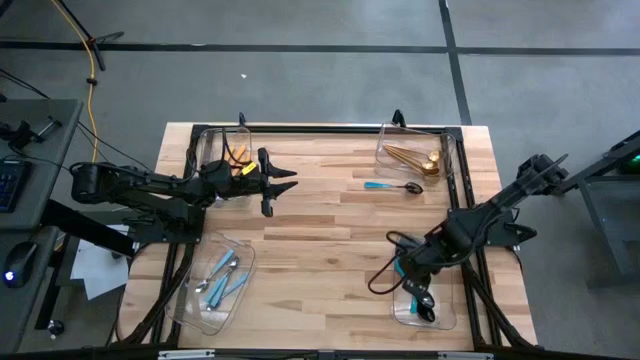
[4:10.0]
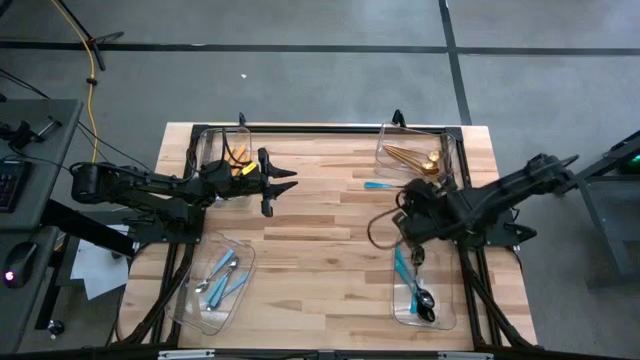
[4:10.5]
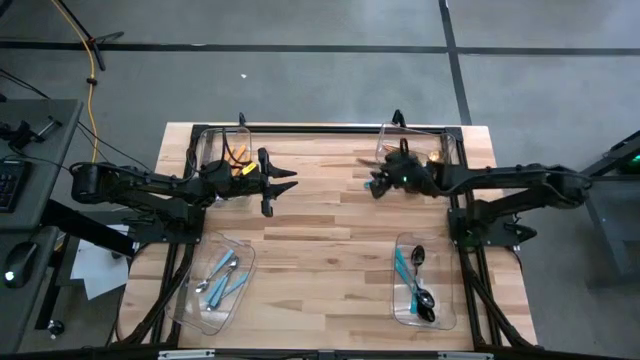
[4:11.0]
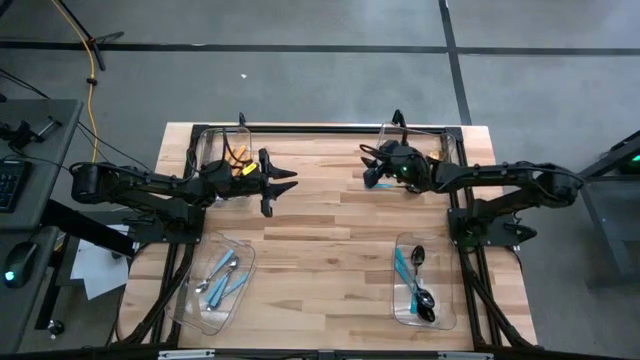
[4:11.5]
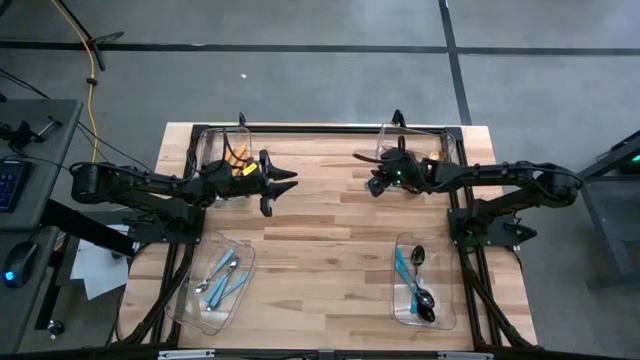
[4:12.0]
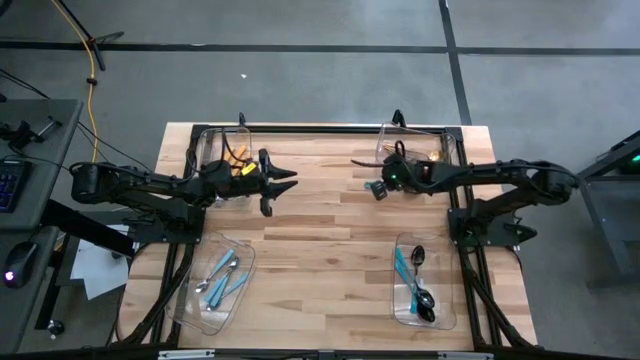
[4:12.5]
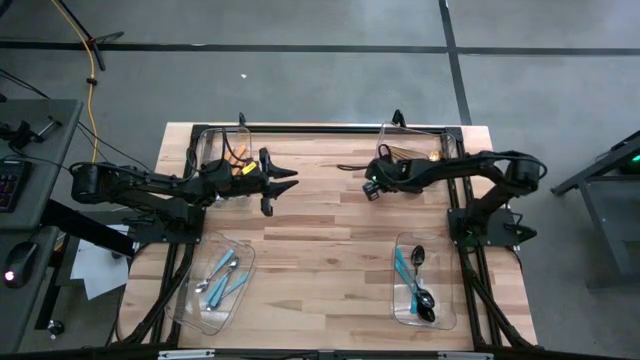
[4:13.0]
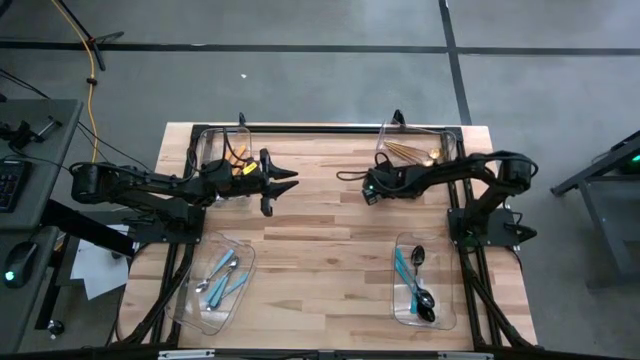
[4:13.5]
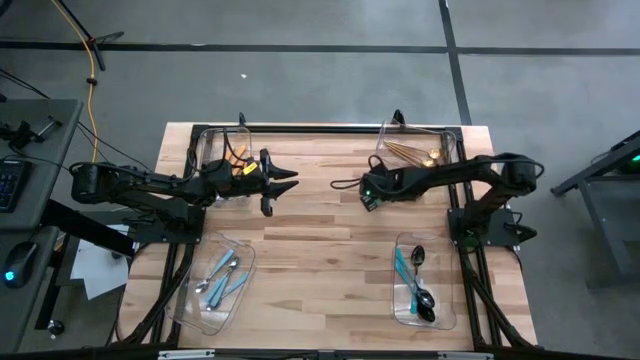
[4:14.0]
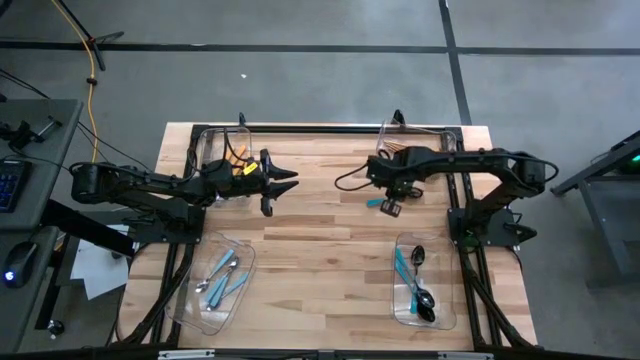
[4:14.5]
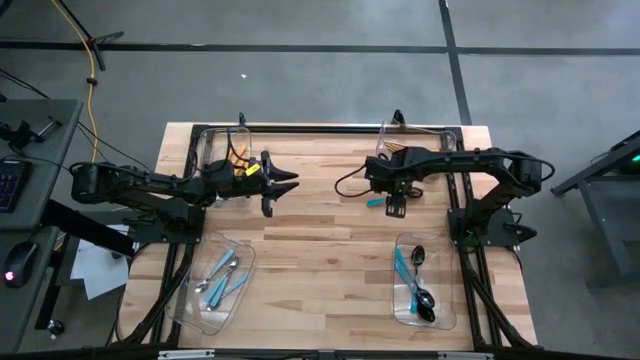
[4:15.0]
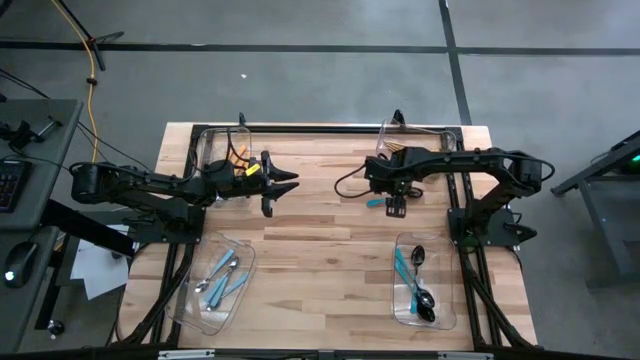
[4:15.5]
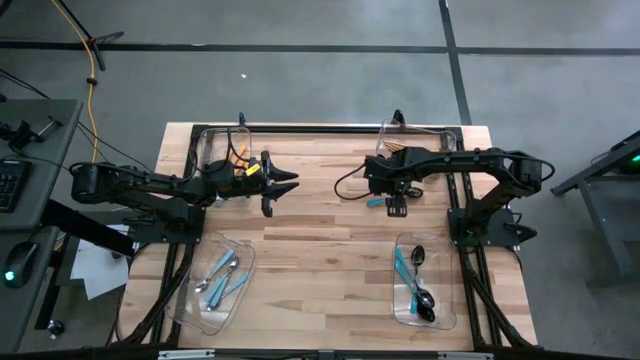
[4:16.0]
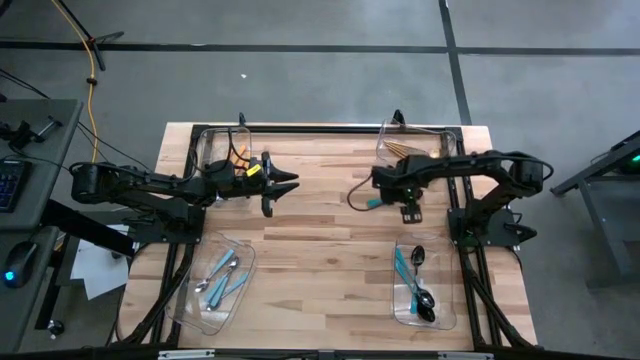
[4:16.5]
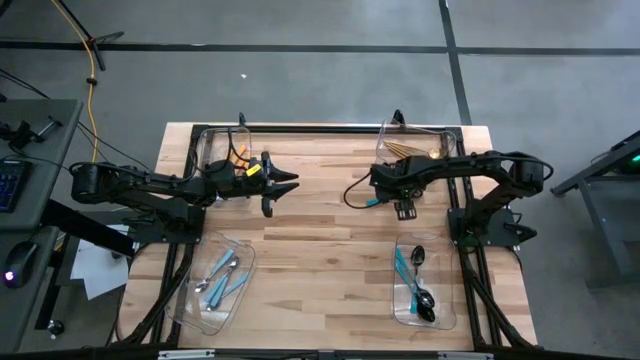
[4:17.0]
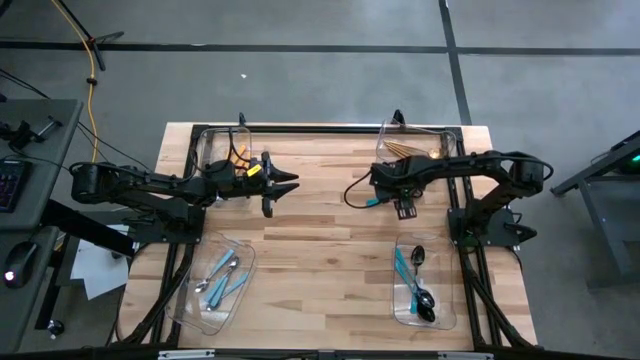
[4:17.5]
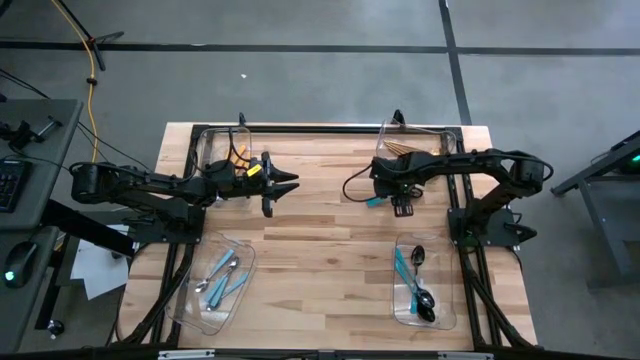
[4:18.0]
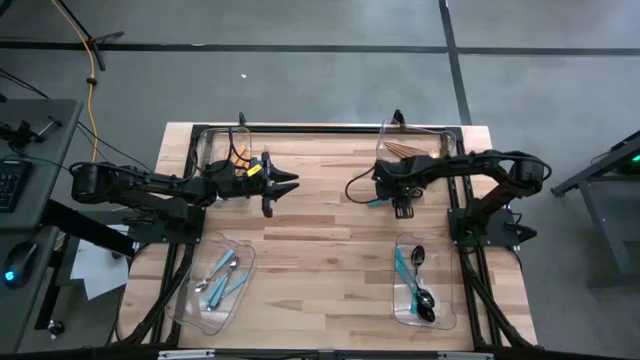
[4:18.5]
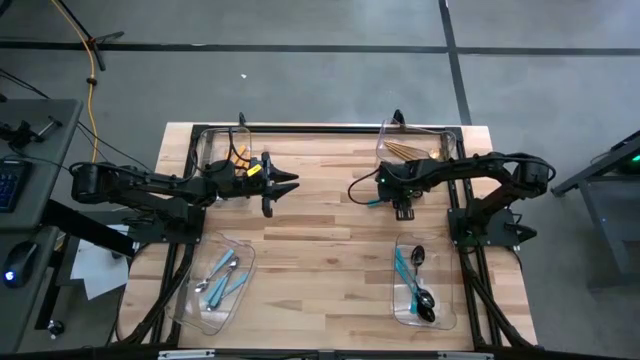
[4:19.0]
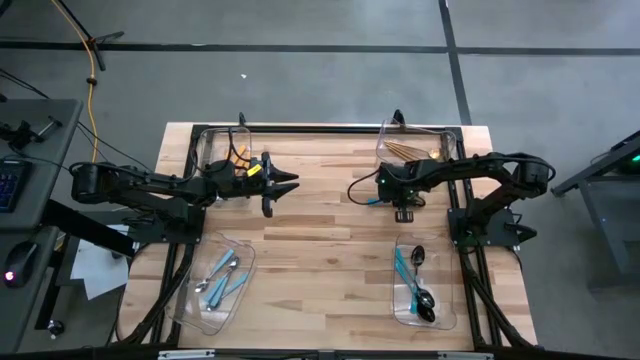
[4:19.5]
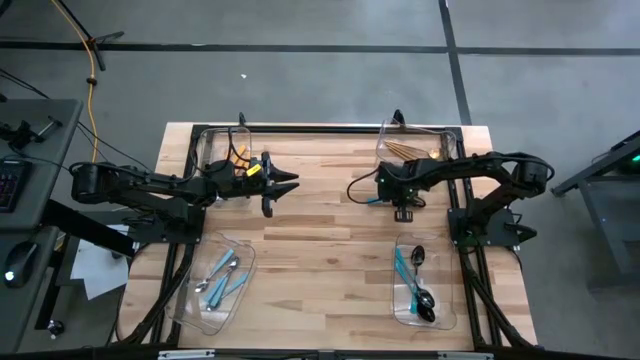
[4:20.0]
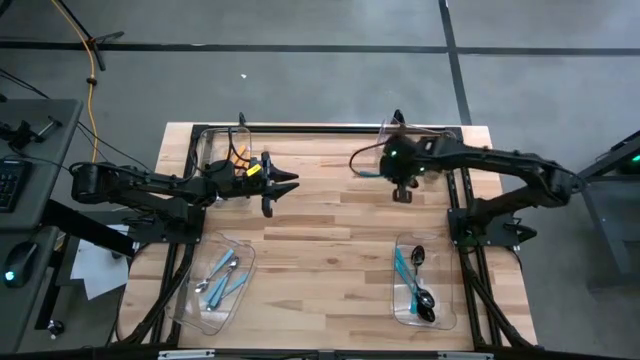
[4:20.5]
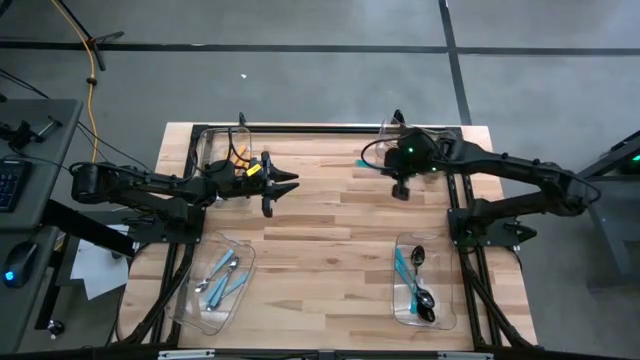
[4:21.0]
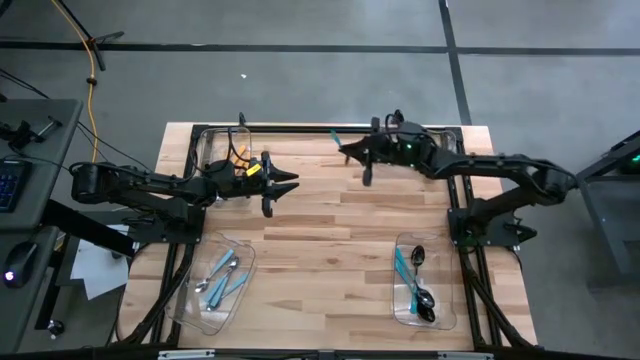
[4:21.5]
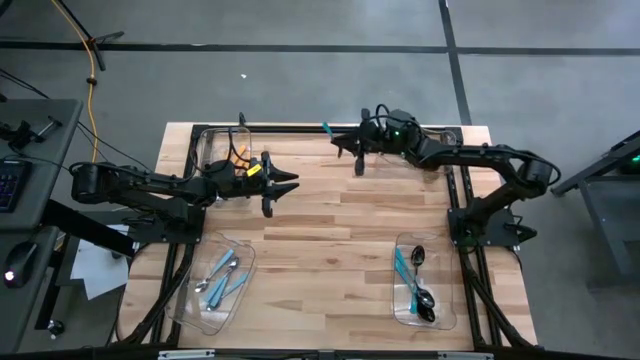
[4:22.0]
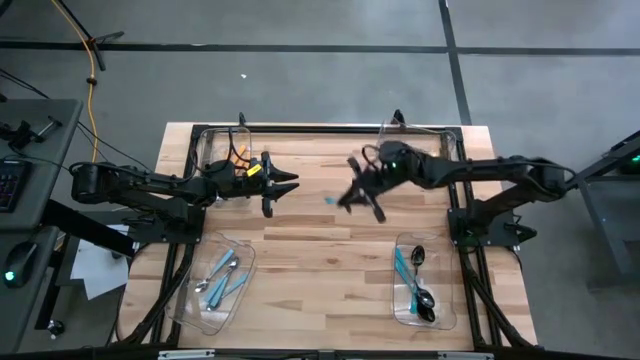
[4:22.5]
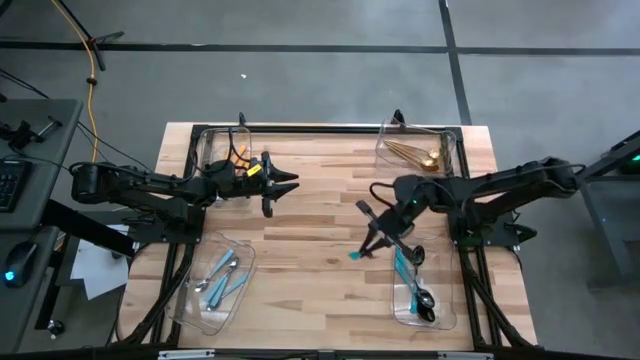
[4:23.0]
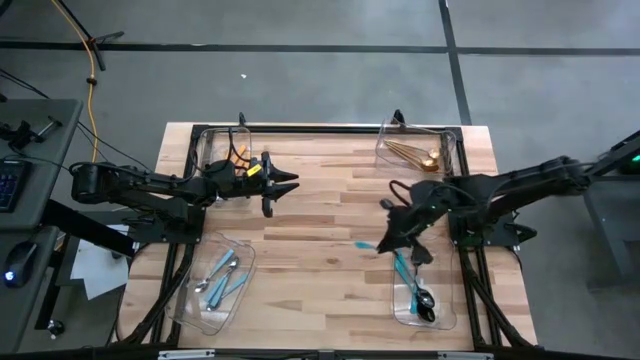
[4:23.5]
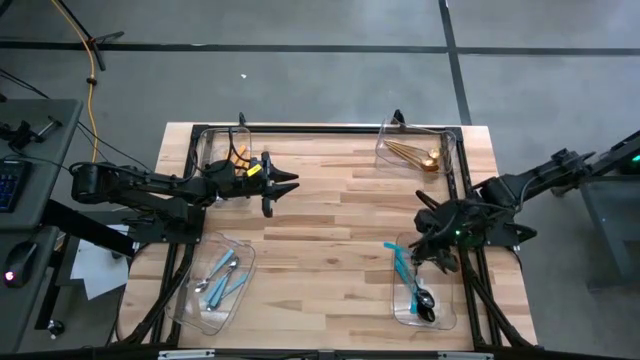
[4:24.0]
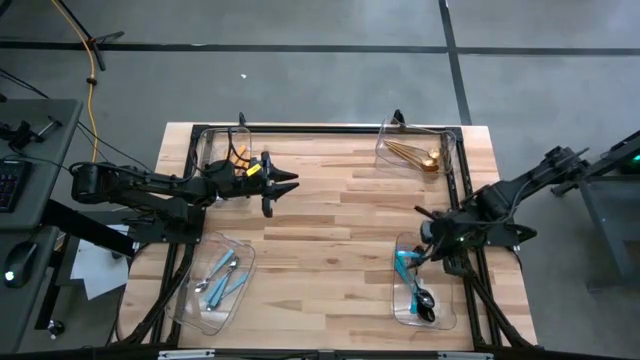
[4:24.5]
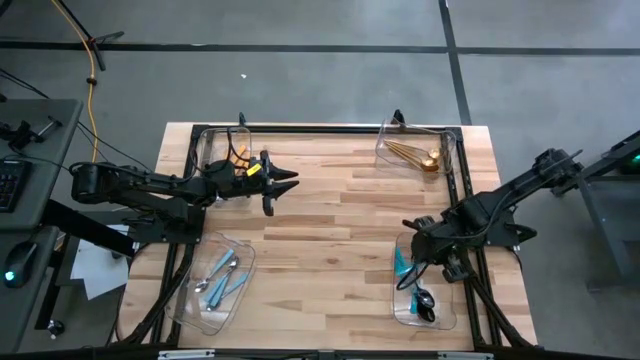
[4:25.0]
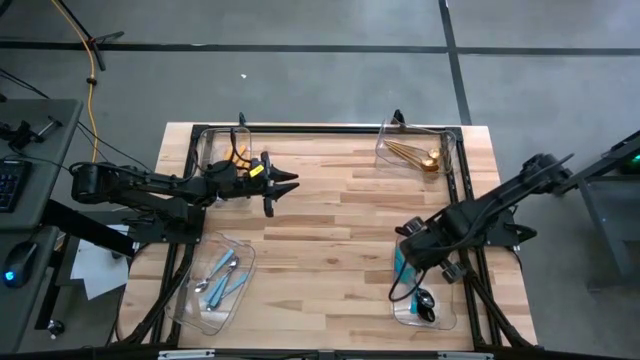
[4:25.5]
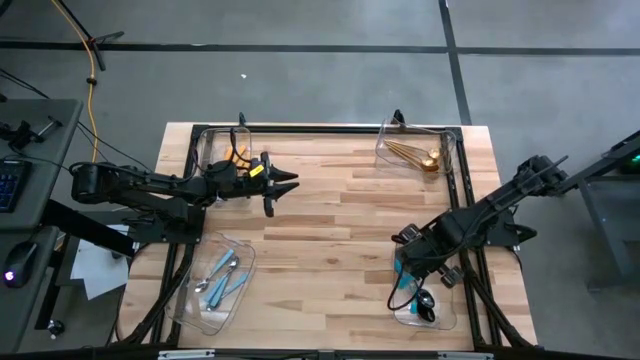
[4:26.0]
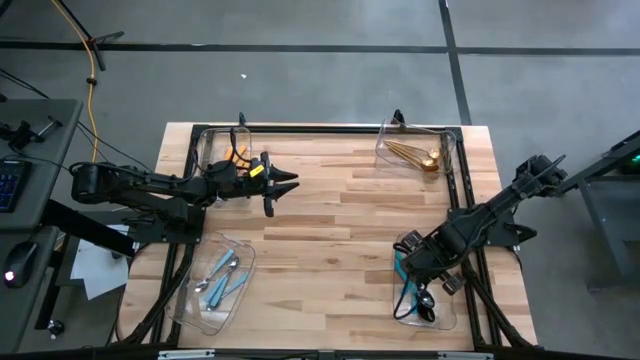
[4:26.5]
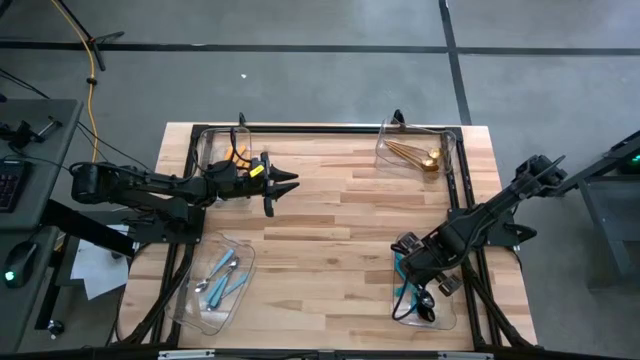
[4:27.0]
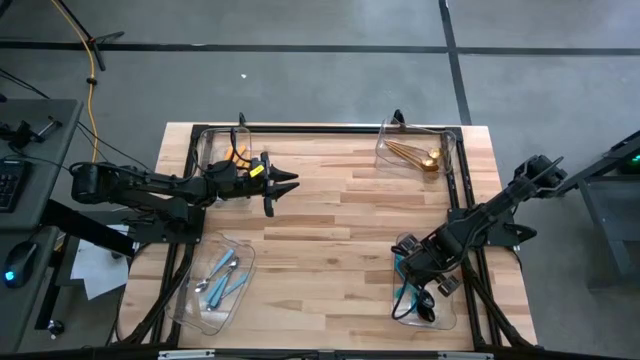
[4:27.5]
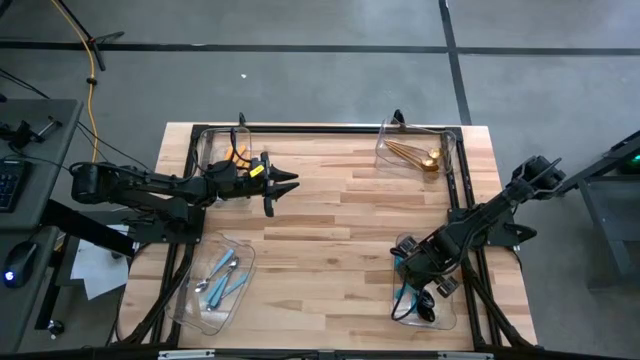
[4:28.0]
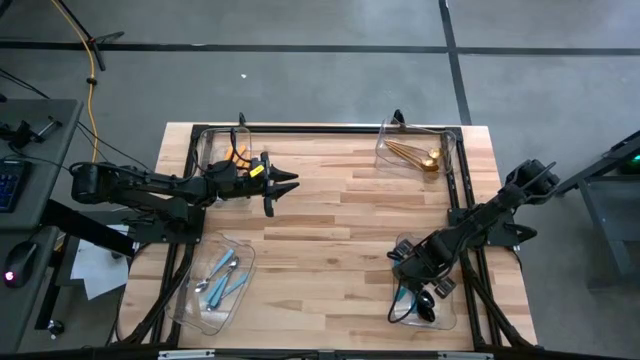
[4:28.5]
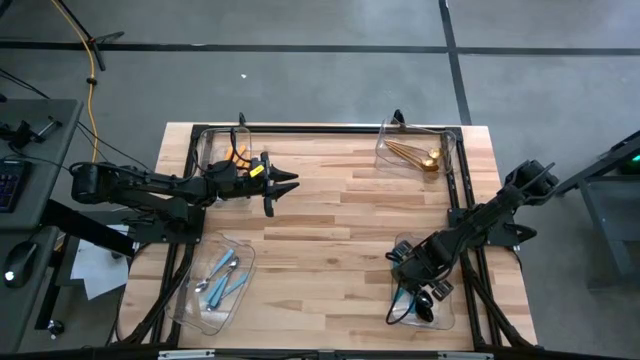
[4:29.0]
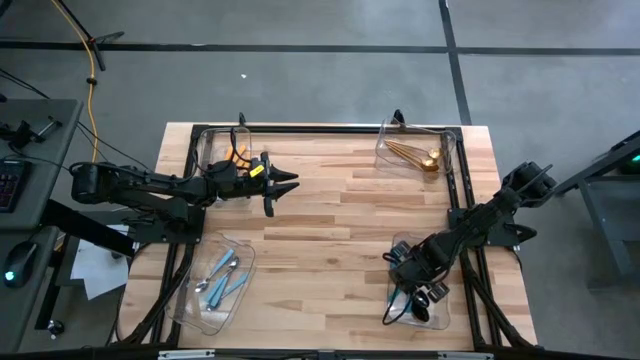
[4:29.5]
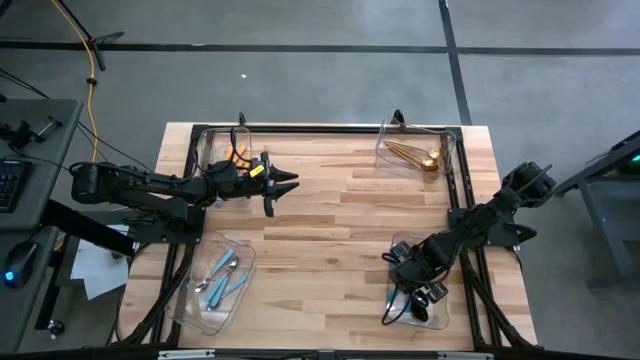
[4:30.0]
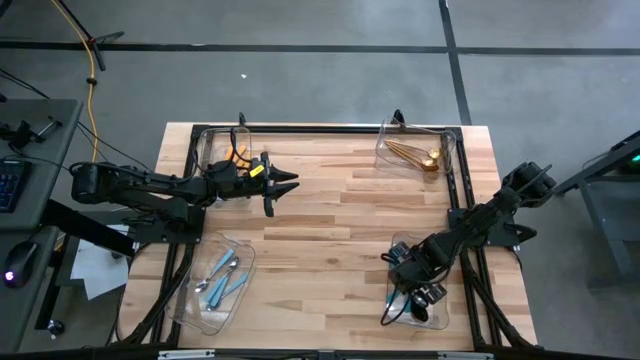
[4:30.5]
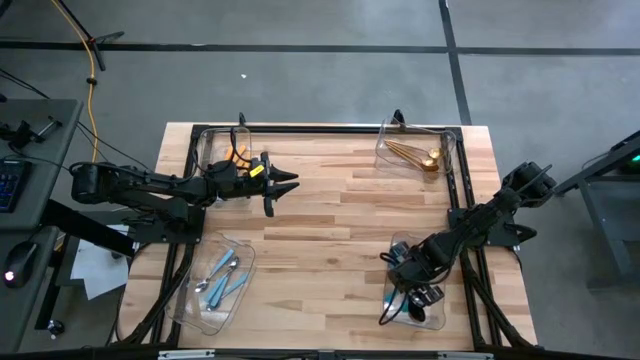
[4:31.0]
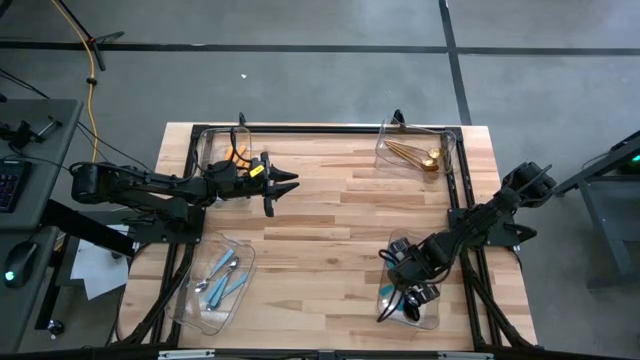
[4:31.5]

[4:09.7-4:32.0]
Task: Sort silverware by color (type)
Put the blue spoon into the bottom right transparent bin
